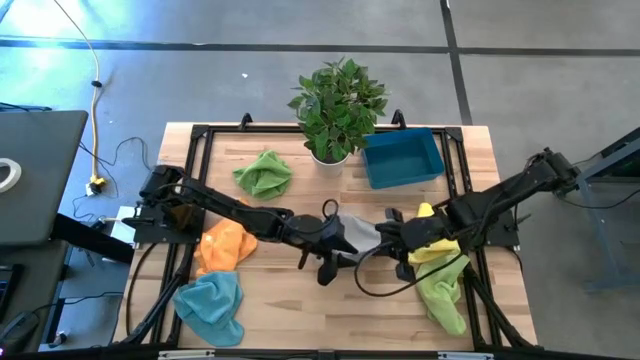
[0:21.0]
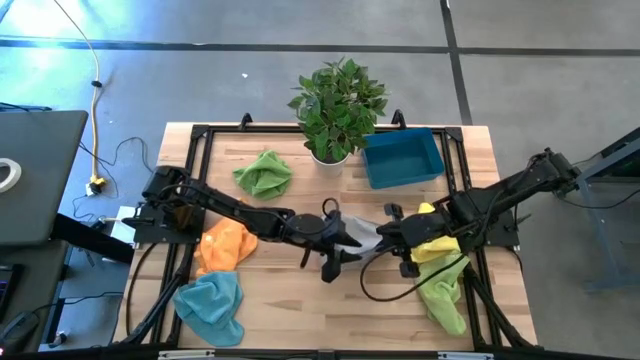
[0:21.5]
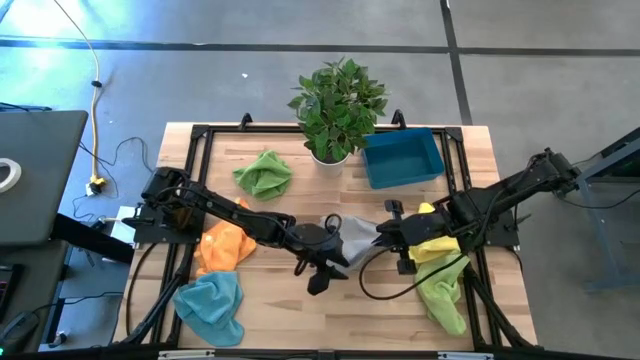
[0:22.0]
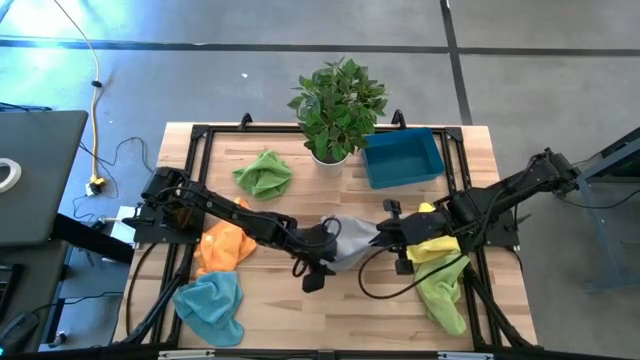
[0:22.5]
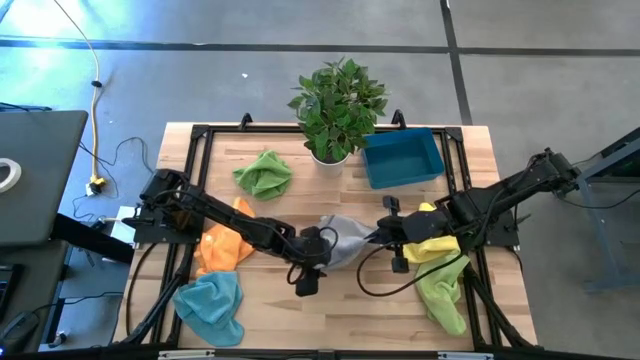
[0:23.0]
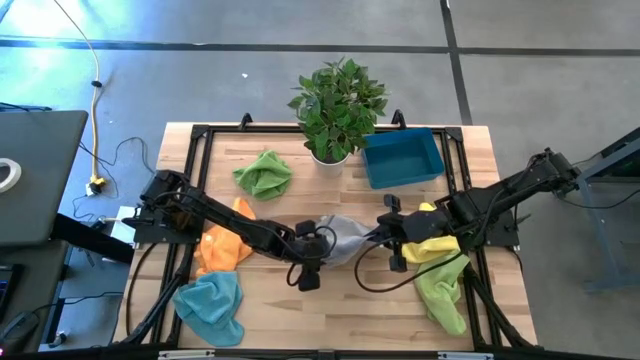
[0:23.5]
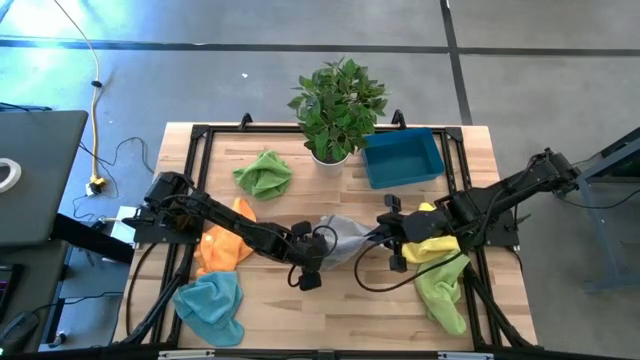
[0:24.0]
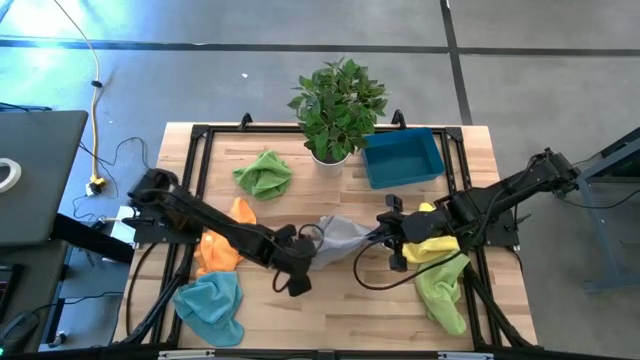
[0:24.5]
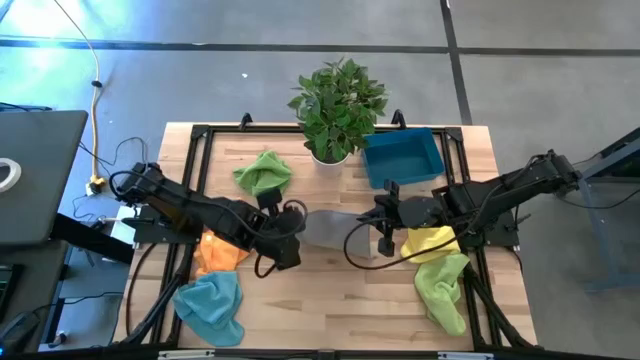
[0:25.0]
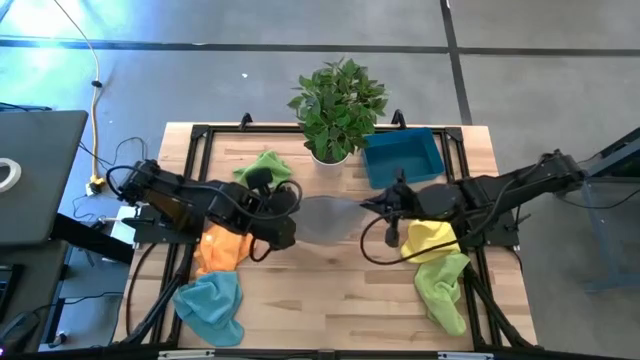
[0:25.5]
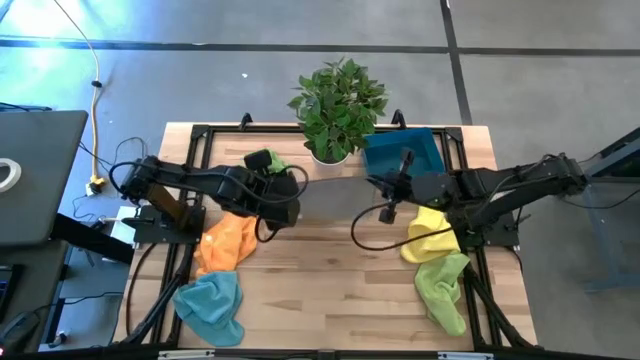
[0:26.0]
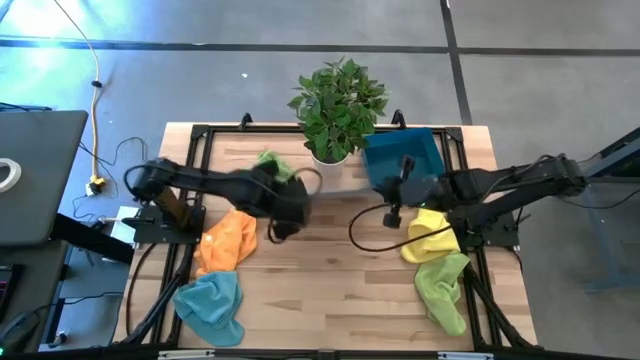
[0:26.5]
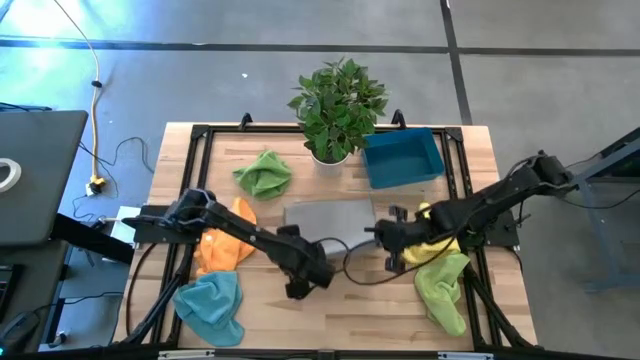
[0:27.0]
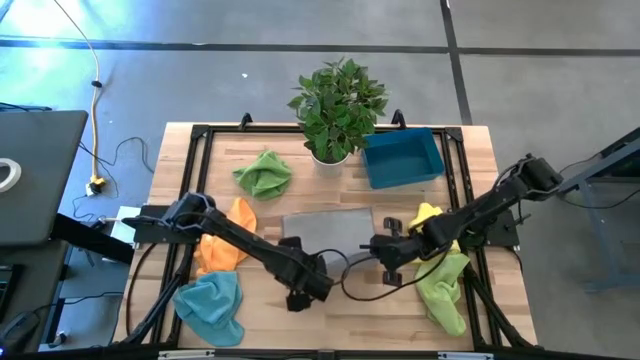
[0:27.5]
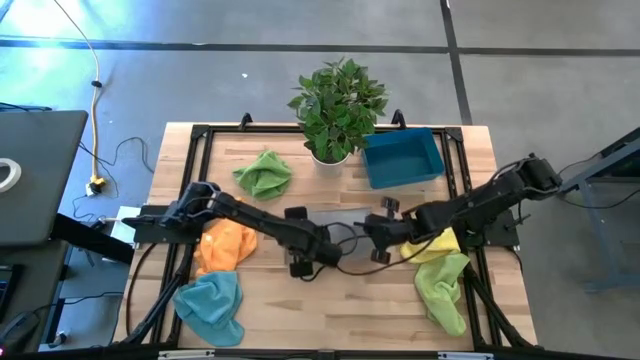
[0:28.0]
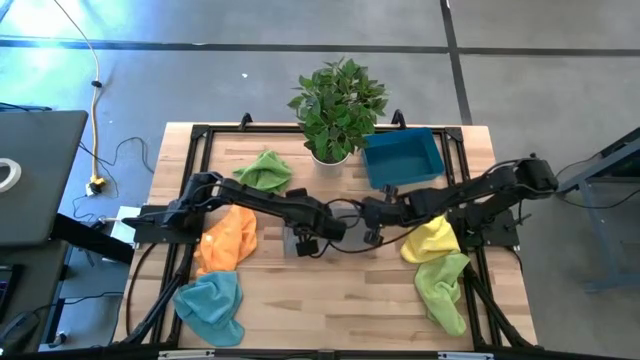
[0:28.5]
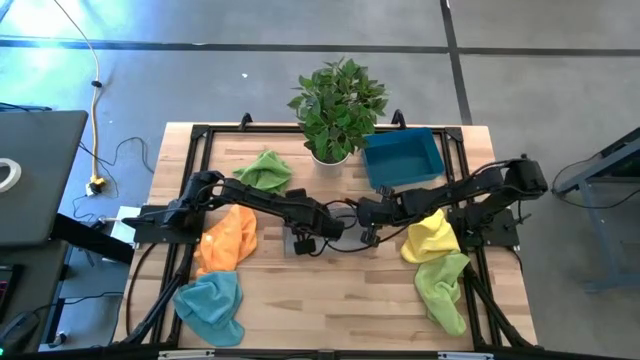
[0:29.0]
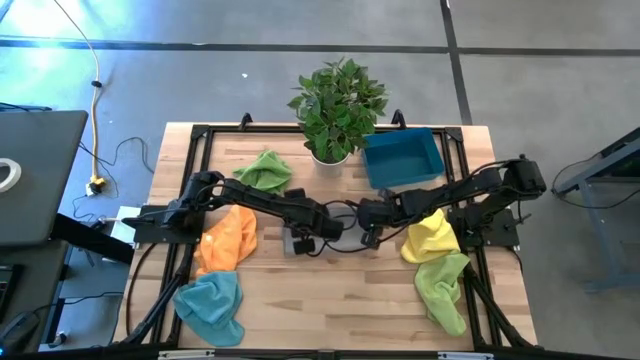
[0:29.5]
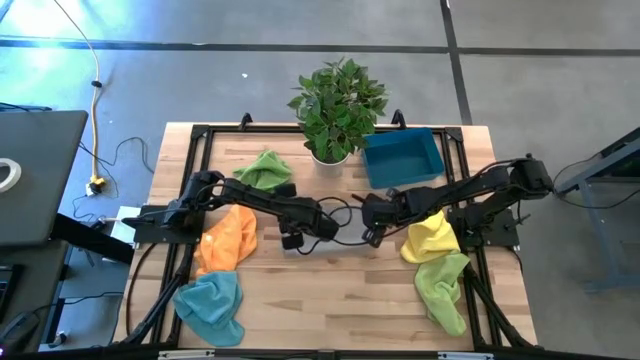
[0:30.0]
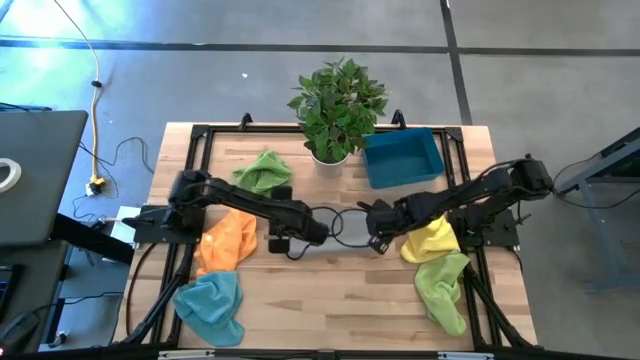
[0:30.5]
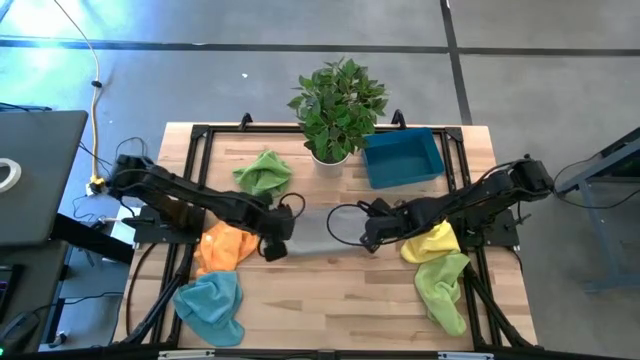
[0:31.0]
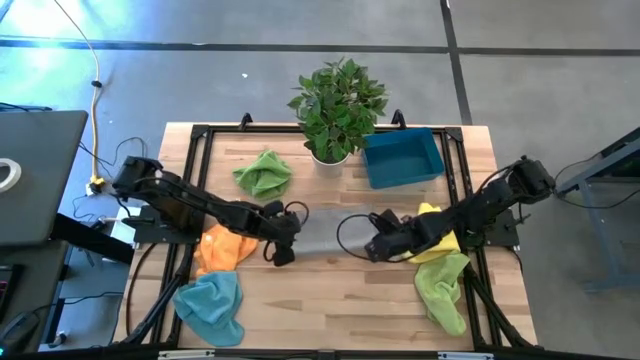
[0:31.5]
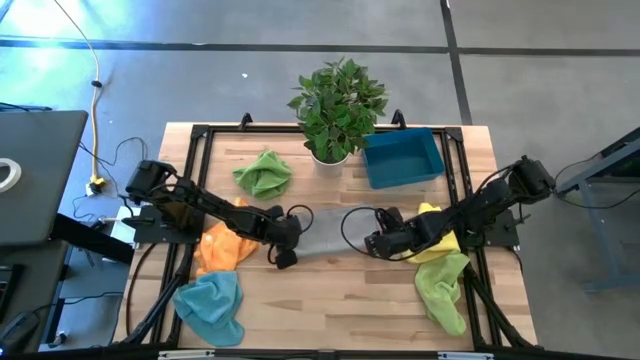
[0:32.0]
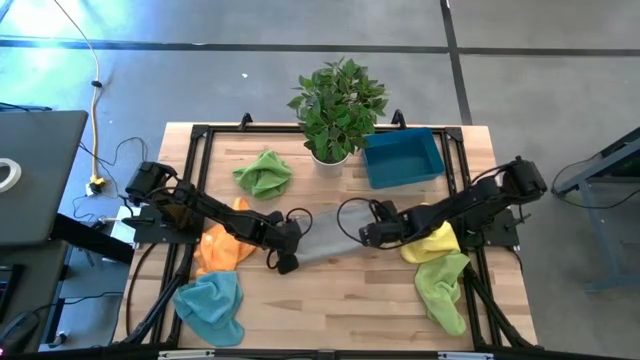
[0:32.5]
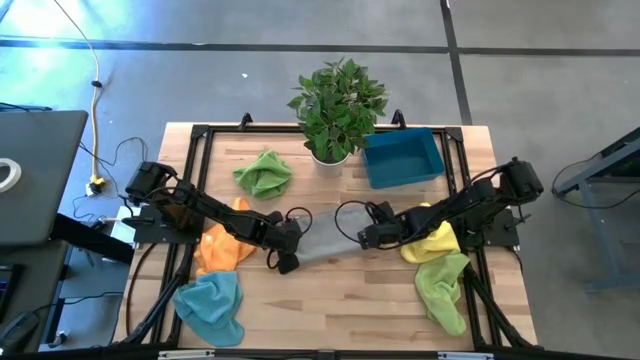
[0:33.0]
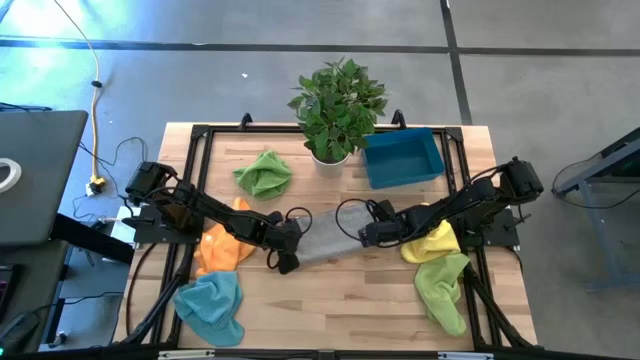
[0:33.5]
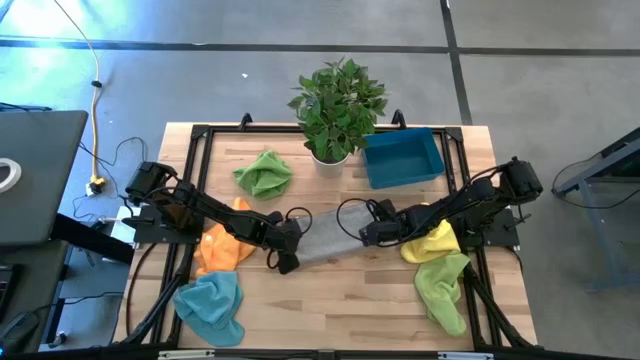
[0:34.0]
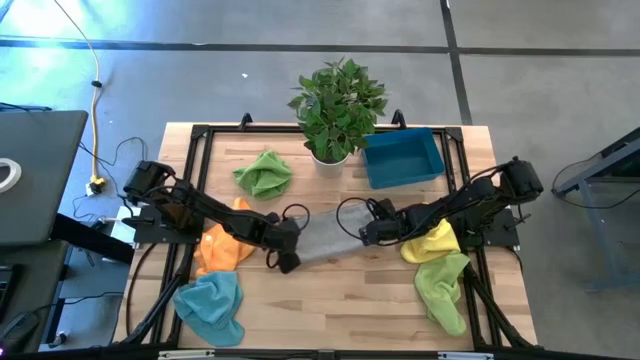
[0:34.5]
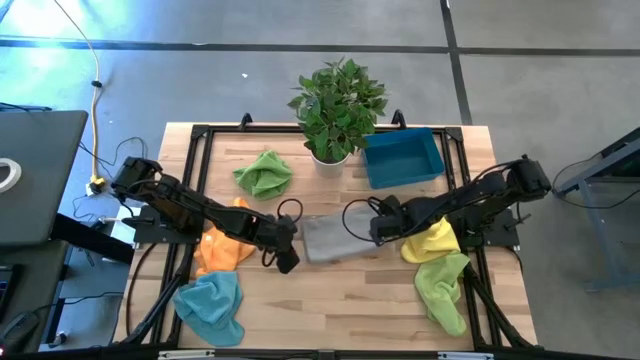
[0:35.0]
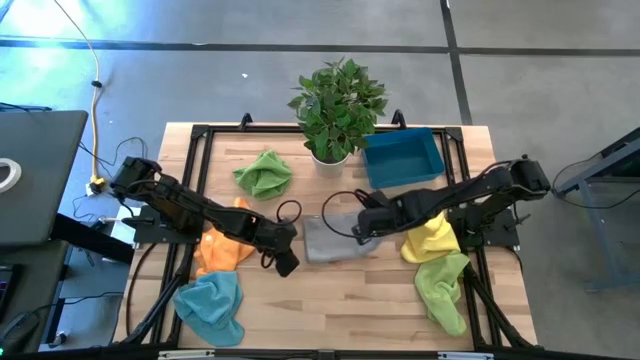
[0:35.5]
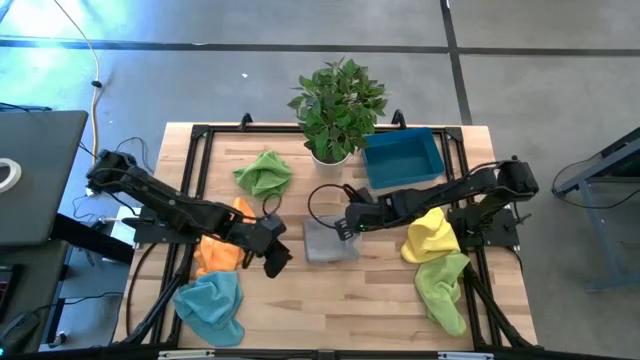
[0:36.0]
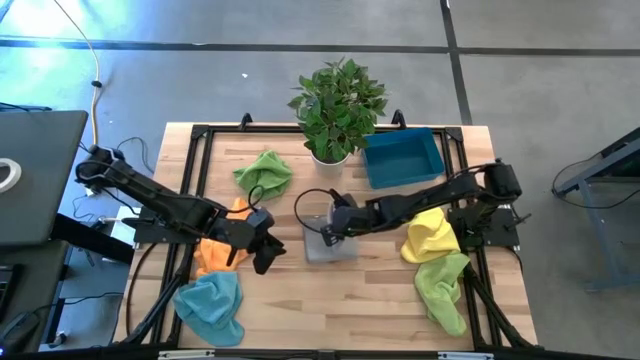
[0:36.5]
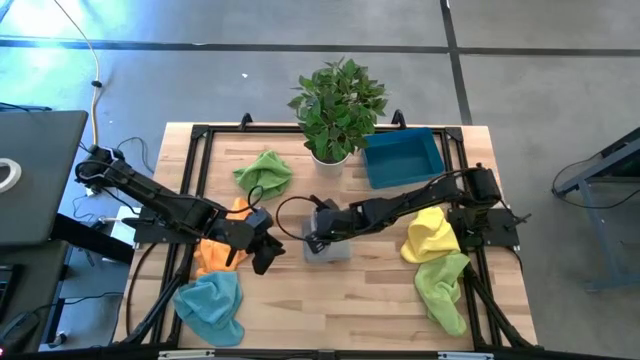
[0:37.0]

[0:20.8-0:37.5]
Task: Sort microfiber towel by color & place in baskets
Fold the gray towel

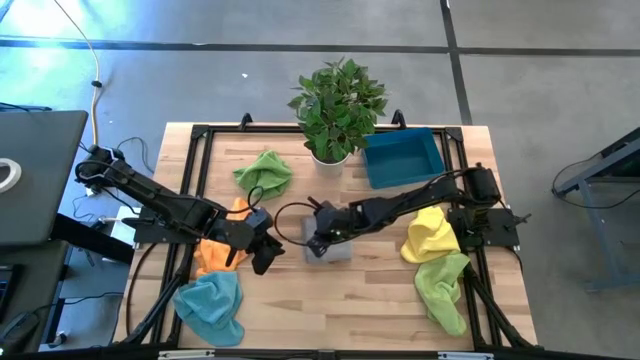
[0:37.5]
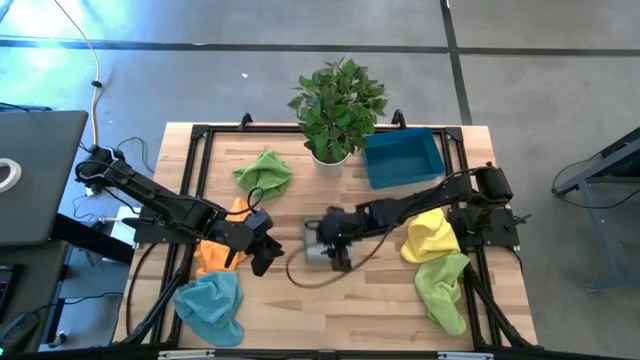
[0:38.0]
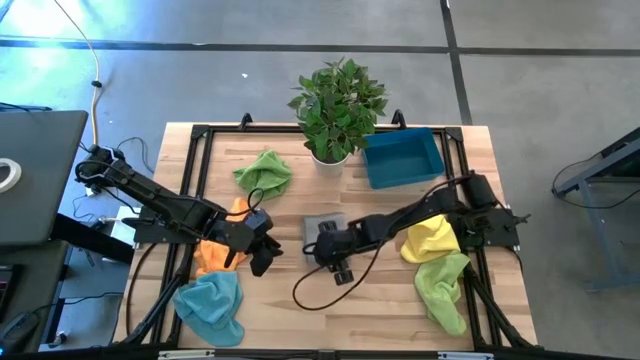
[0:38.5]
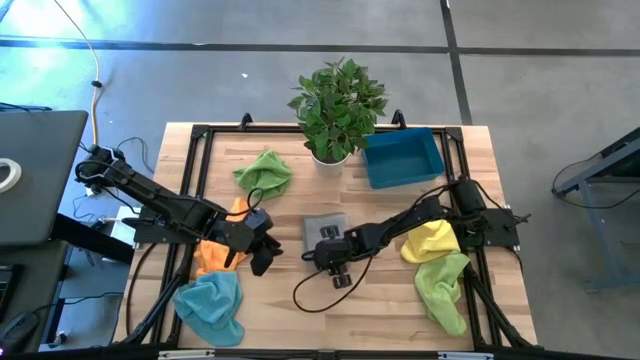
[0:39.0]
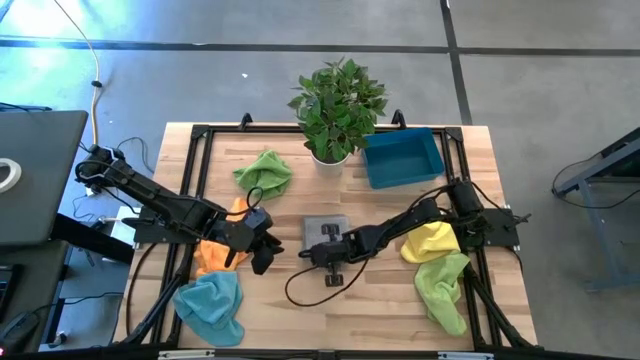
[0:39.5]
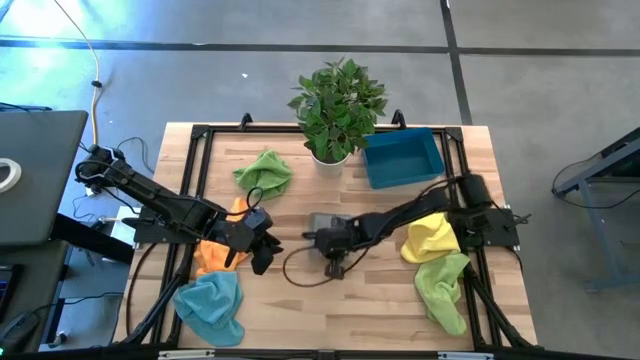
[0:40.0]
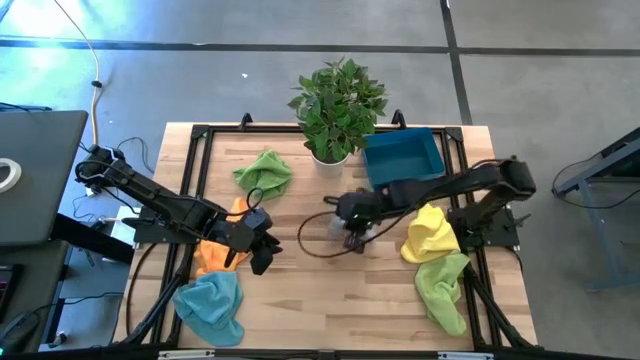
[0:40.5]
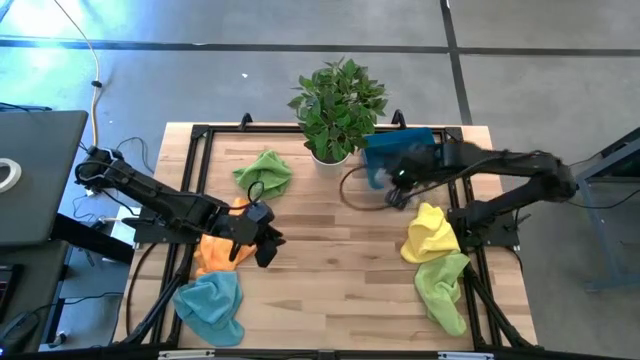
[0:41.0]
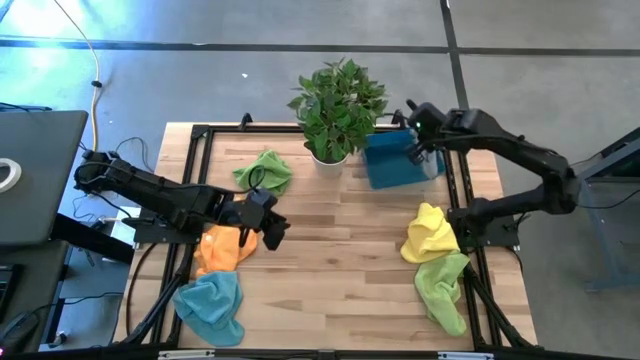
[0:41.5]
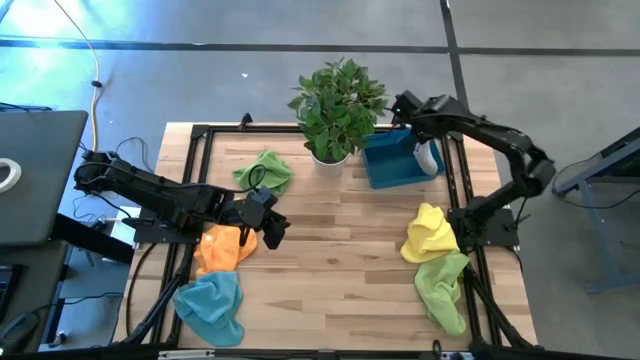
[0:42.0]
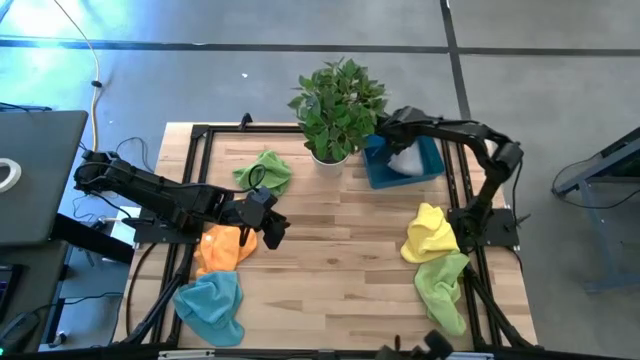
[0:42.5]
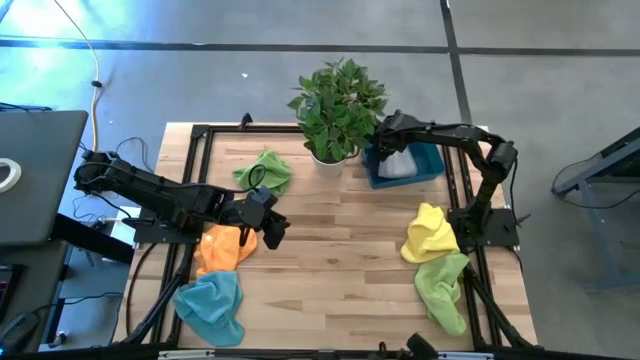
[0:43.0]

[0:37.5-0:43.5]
Put the gray towel into the blue bin
